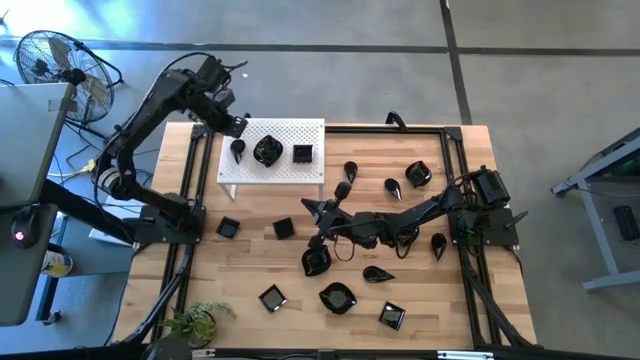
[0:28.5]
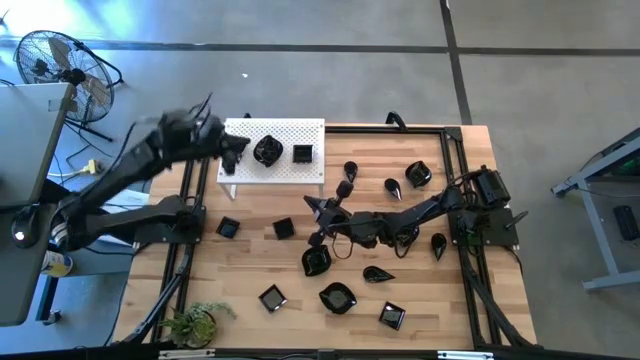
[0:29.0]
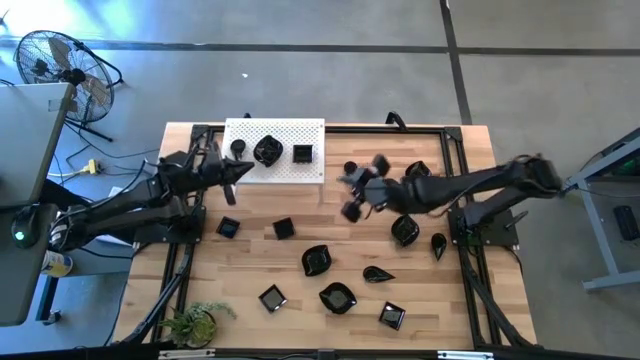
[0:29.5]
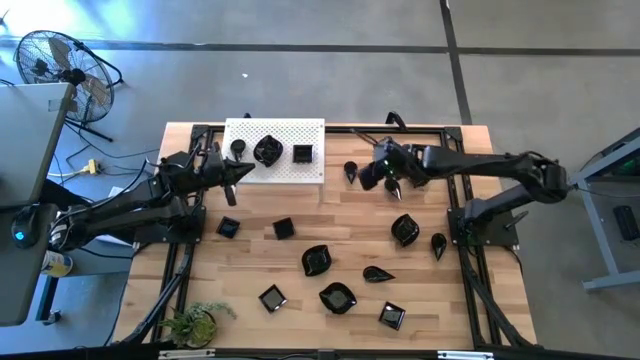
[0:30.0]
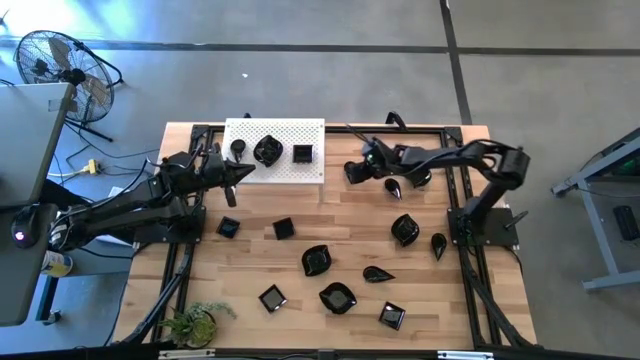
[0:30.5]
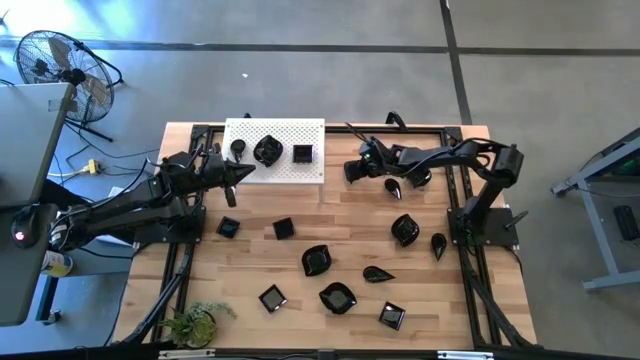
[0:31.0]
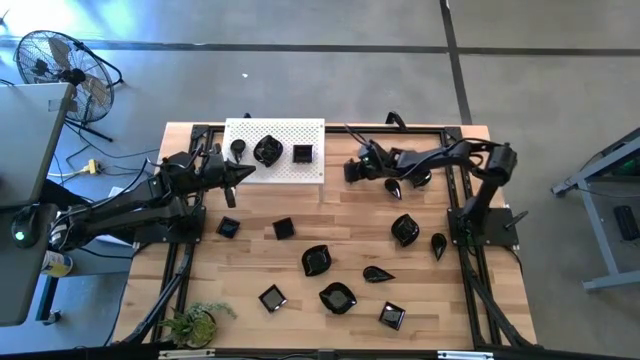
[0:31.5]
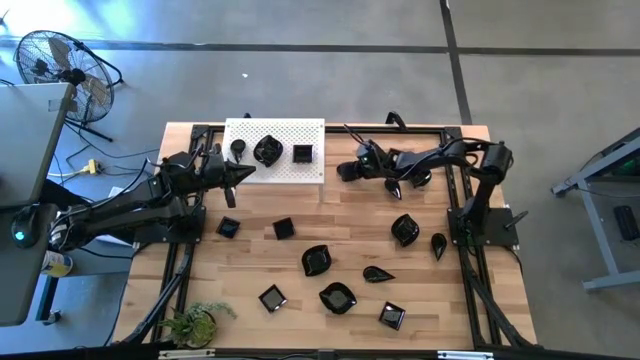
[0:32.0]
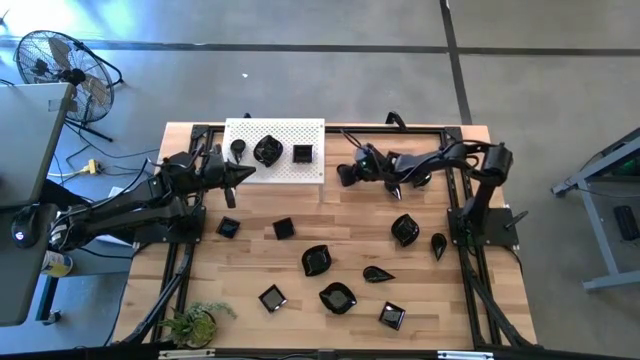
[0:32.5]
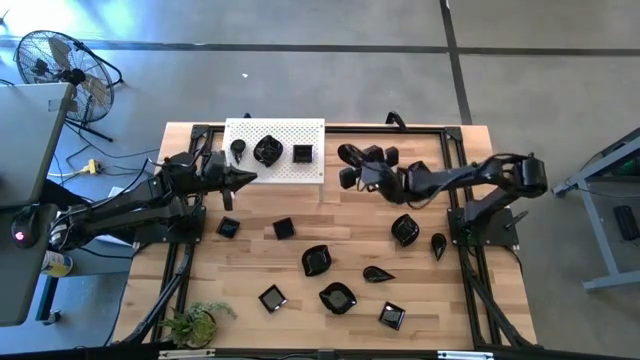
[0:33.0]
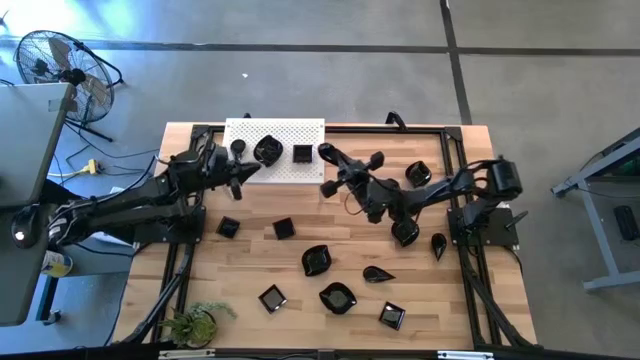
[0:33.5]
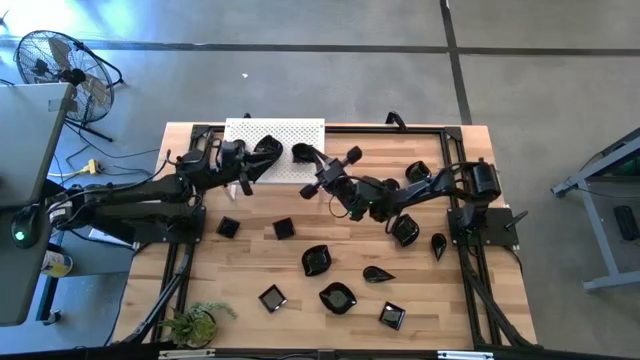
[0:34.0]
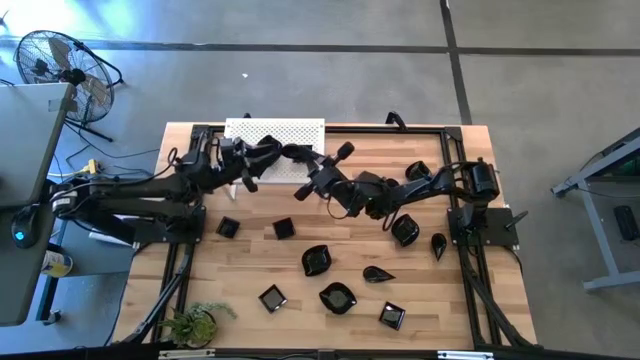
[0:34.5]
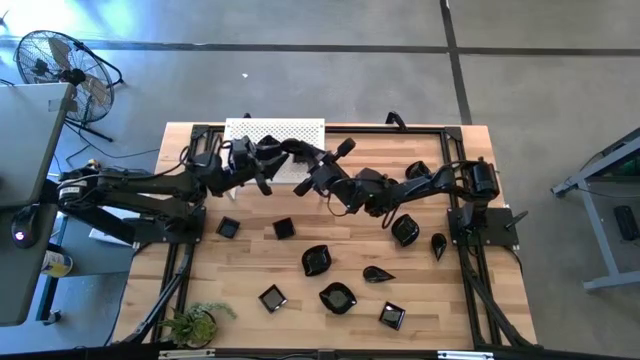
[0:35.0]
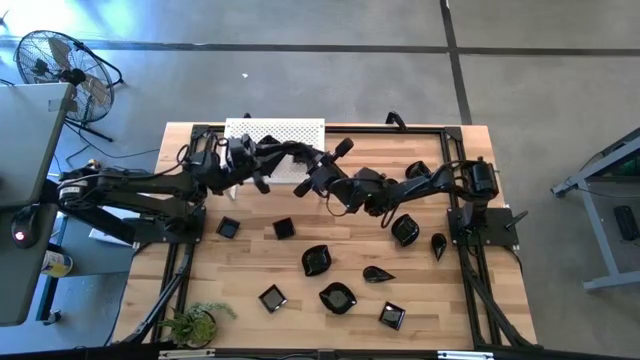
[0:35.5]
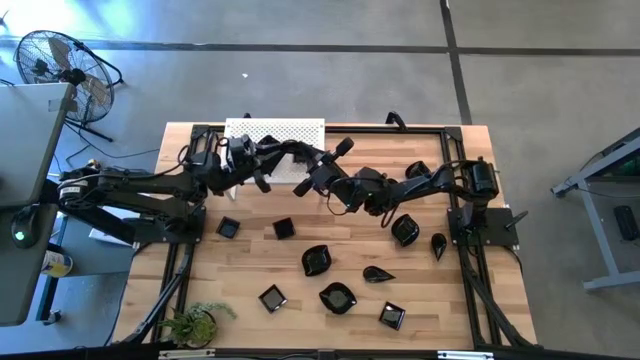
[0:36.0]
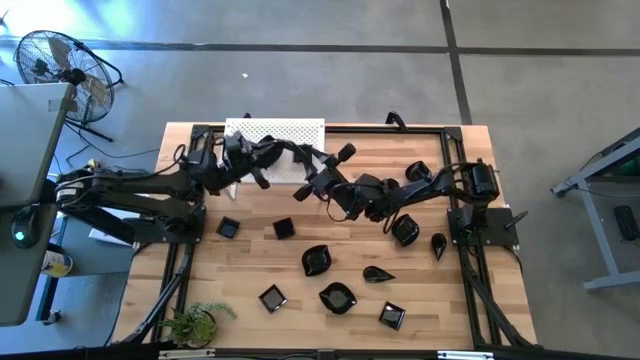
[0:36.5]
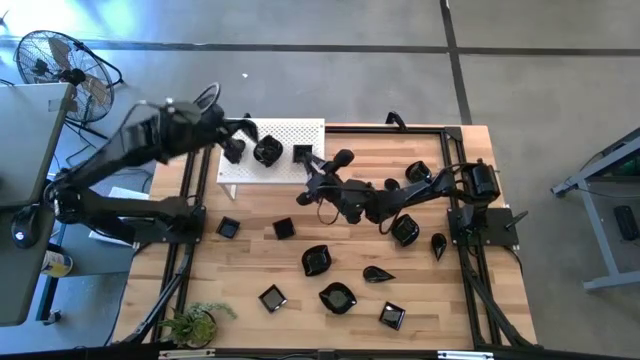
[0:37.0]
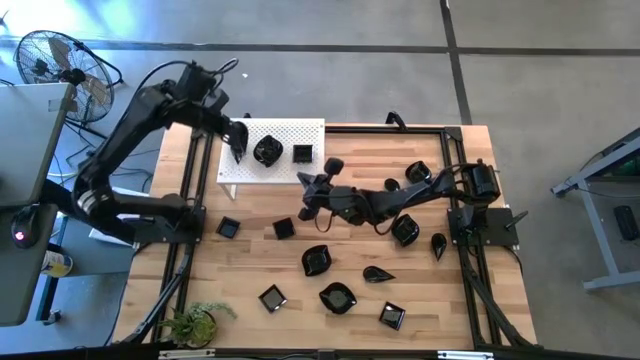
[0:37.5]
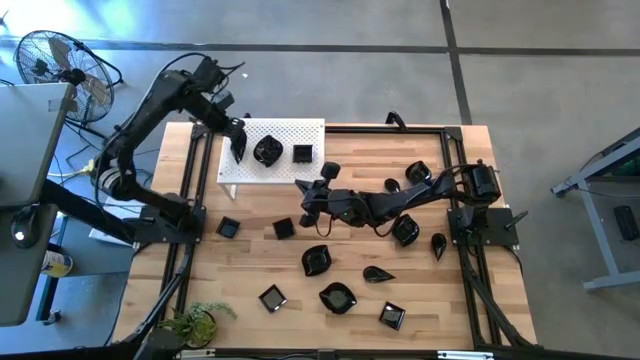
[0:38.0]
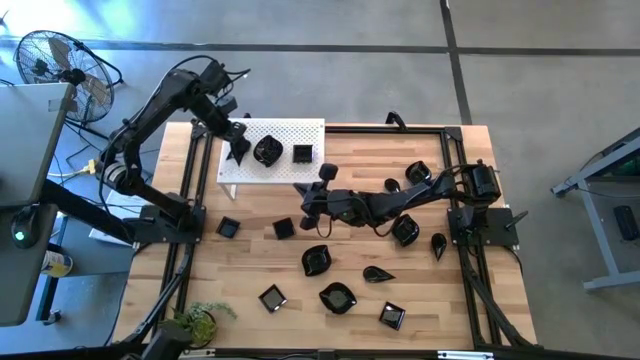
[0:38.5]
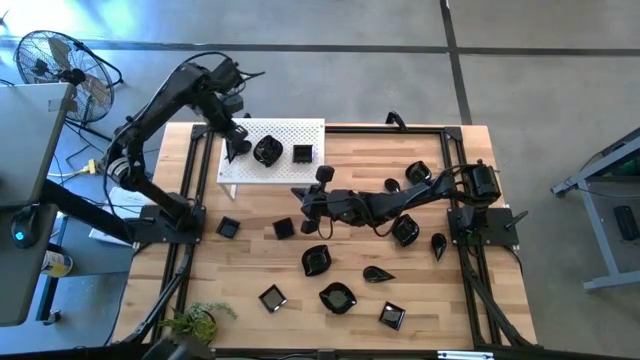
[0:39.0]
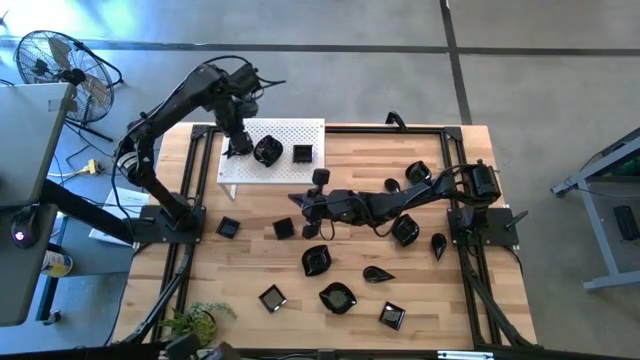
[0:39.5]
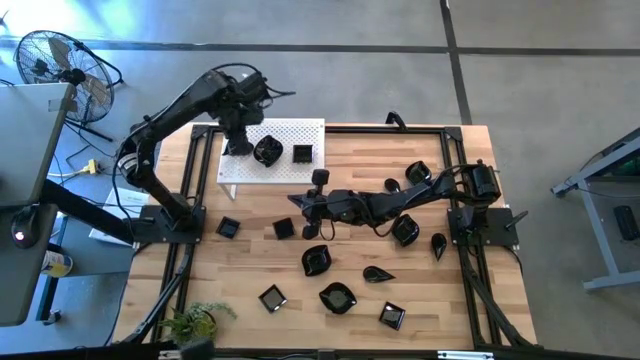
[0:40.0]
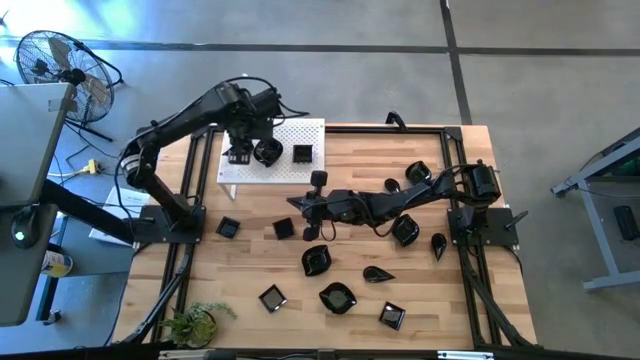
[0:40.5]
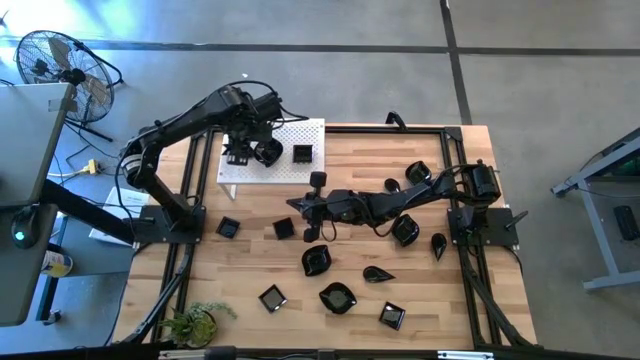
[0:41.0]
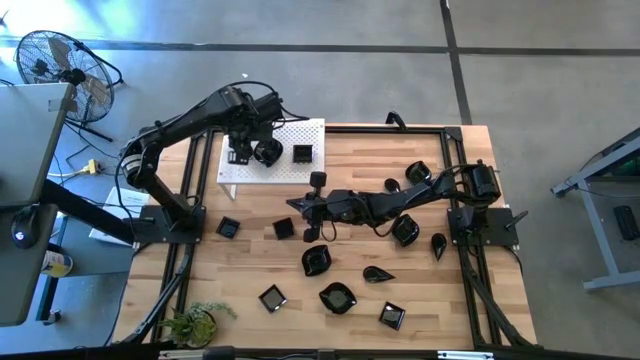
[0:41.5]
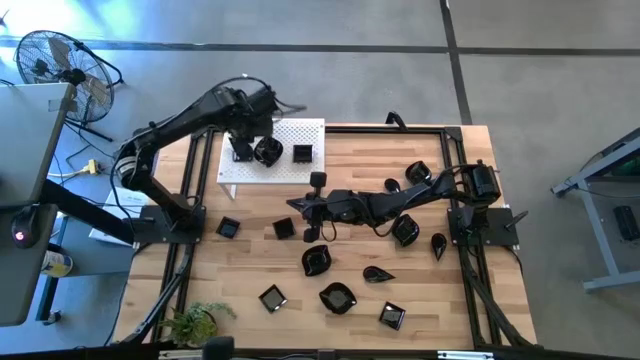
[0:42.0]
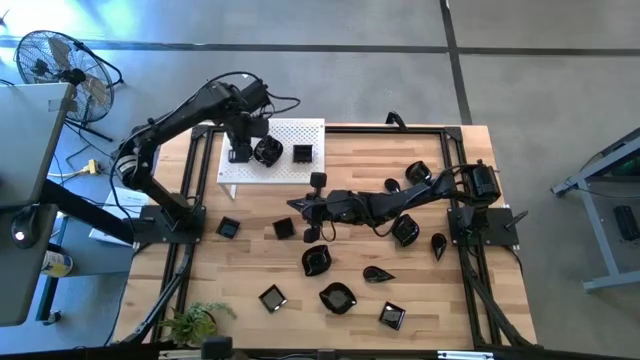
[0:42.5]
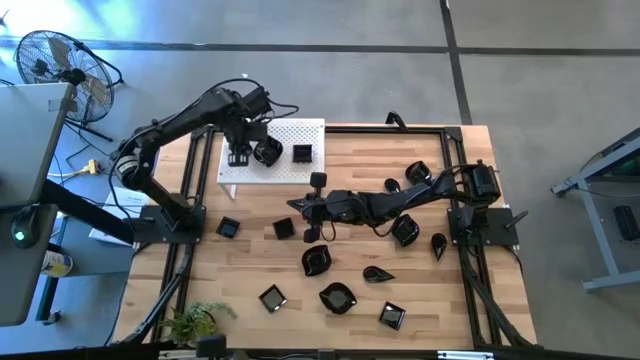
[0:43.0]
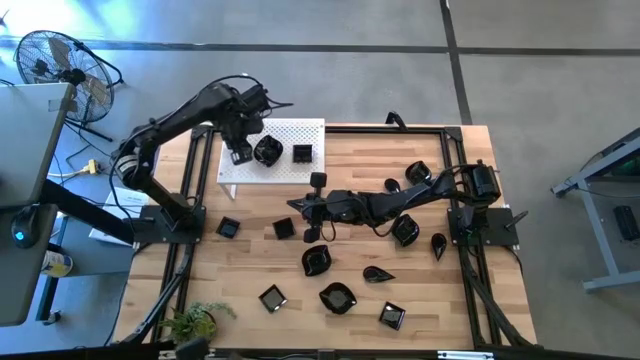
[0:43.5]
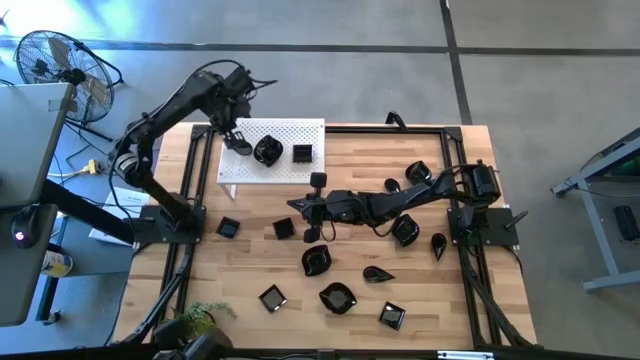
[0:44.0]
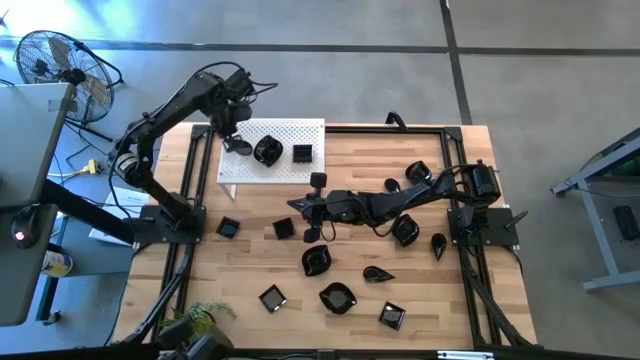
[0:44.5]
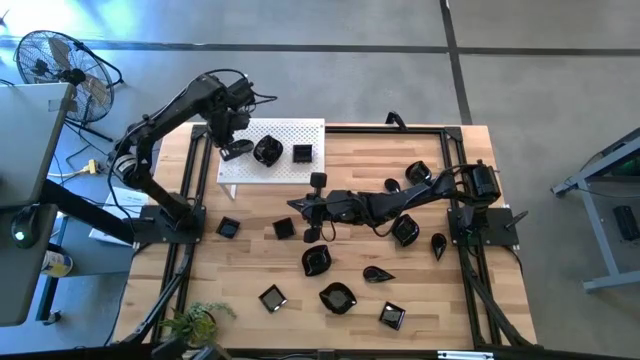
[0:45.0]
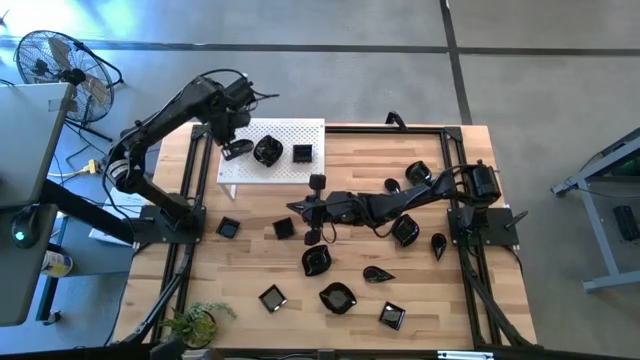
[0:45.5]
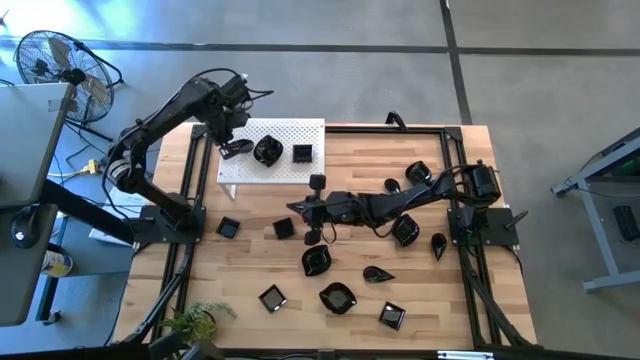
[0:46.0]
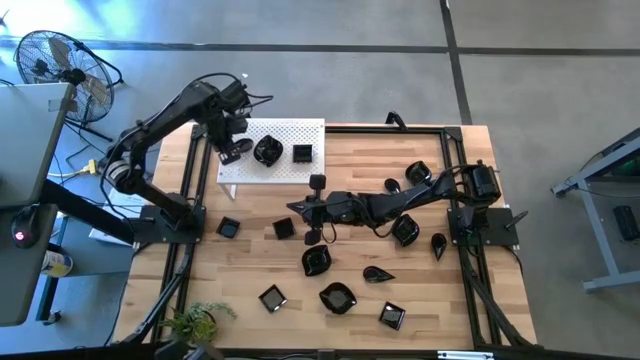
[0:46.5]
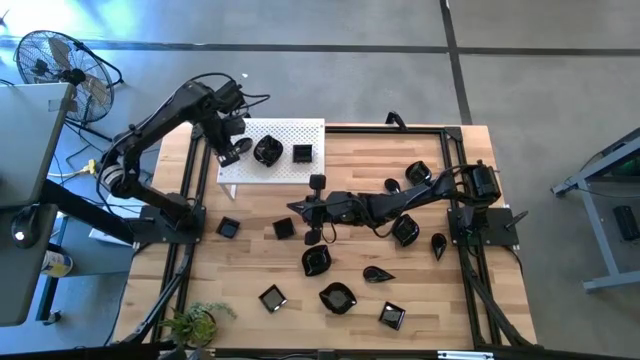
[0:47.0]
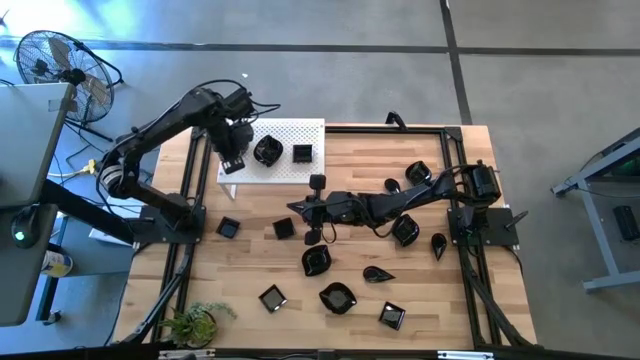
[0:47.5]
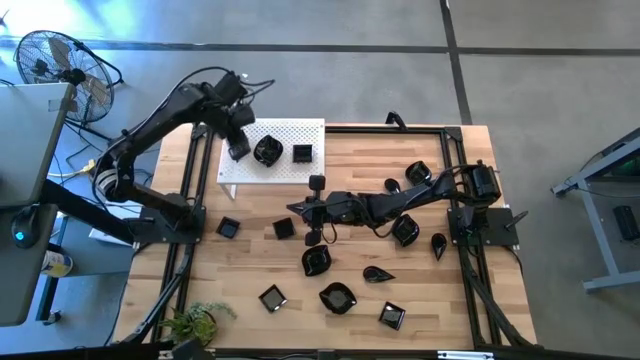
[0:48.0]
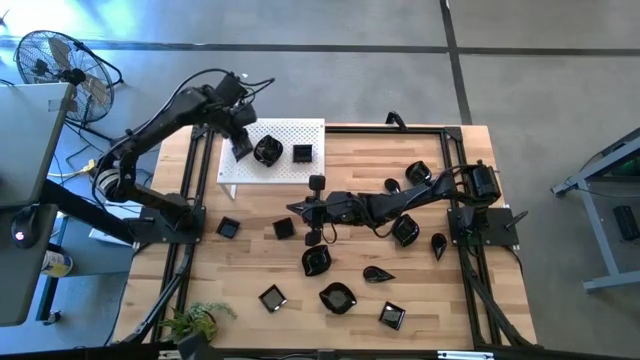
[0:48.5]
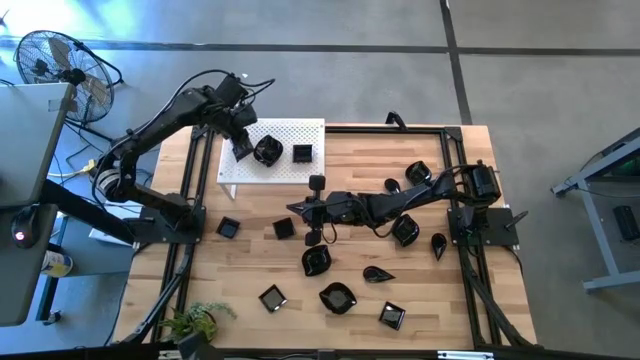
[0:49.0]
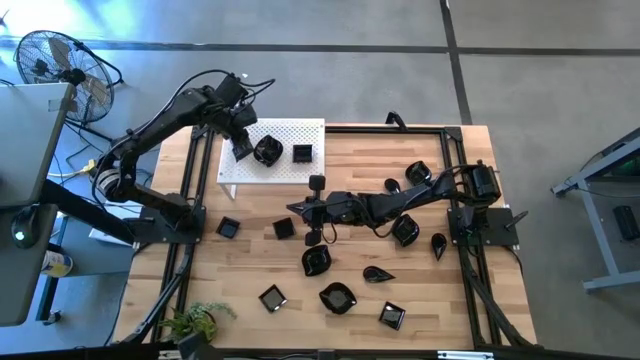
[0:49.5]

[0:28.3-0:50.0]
Task: Pick & Place Mini shaped plates
Stack the drop-shaped plate on top of the drop-shaped plate on the shelf
